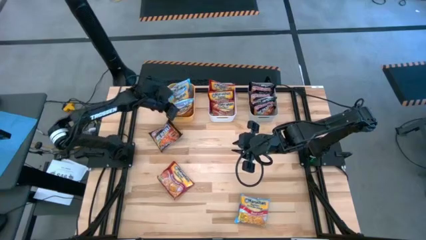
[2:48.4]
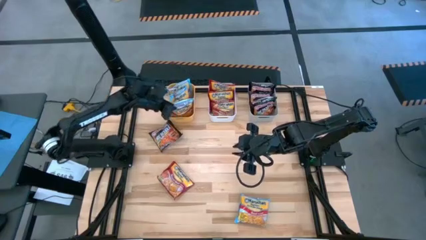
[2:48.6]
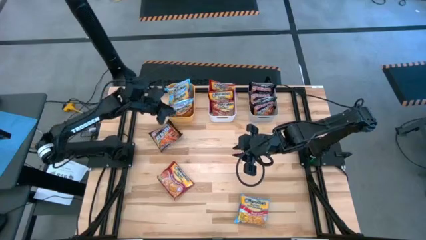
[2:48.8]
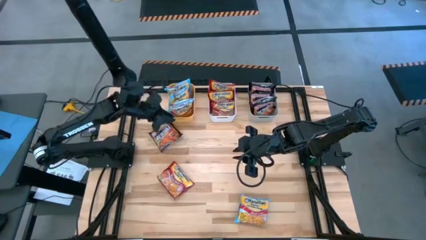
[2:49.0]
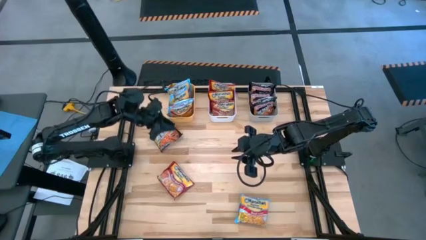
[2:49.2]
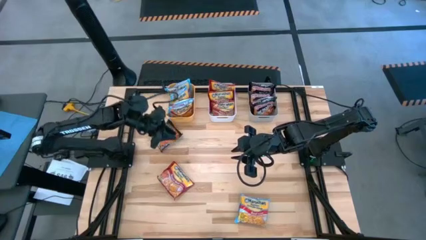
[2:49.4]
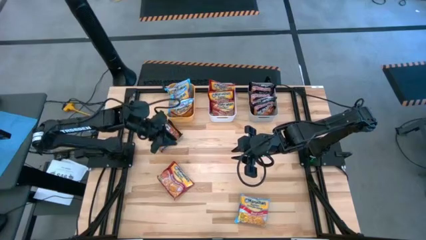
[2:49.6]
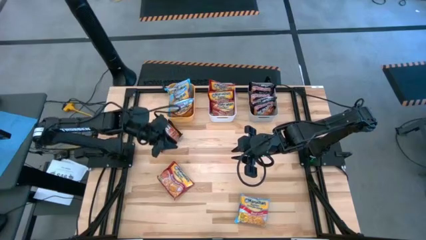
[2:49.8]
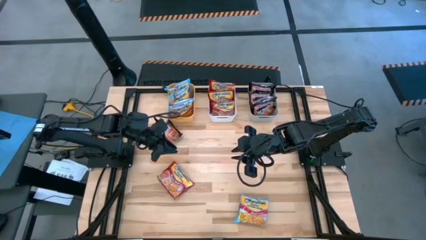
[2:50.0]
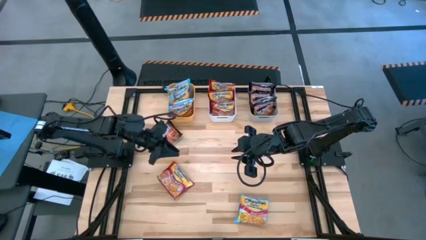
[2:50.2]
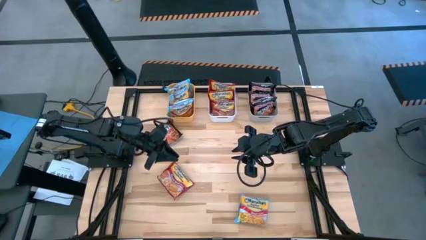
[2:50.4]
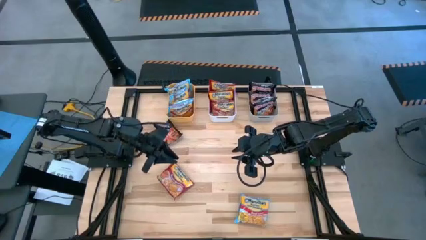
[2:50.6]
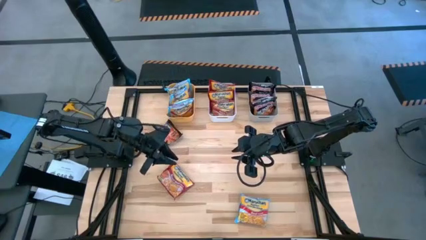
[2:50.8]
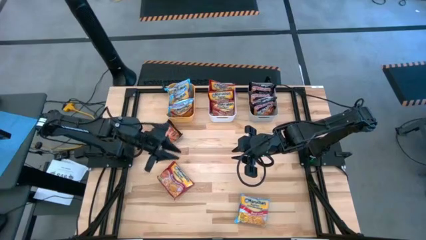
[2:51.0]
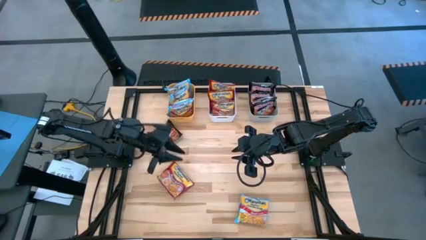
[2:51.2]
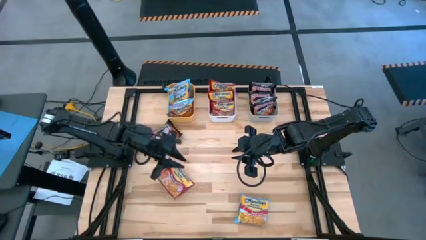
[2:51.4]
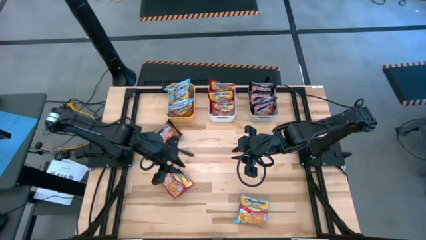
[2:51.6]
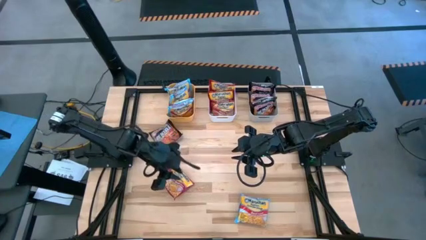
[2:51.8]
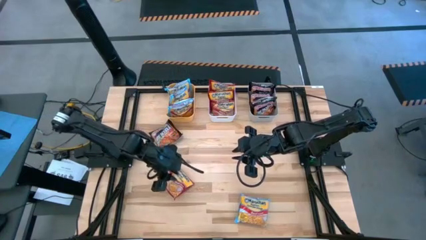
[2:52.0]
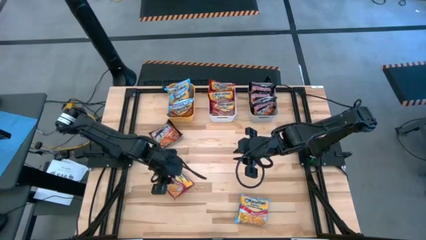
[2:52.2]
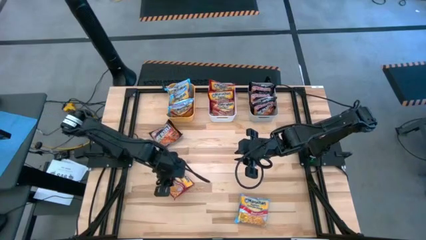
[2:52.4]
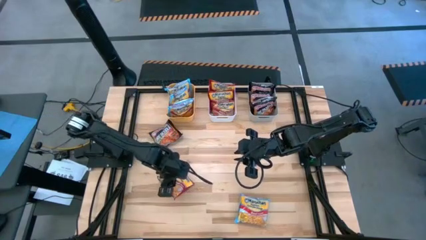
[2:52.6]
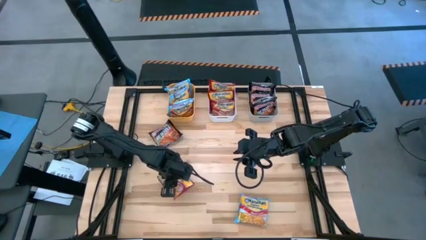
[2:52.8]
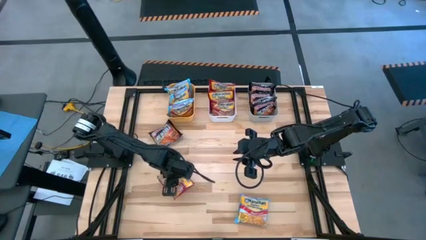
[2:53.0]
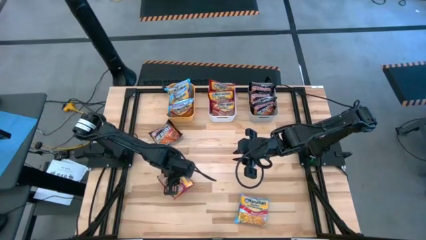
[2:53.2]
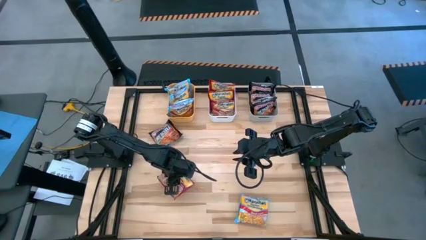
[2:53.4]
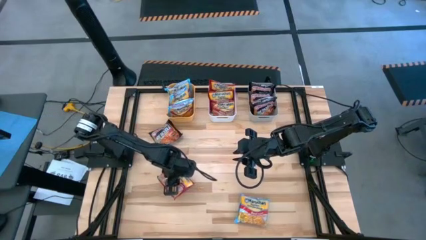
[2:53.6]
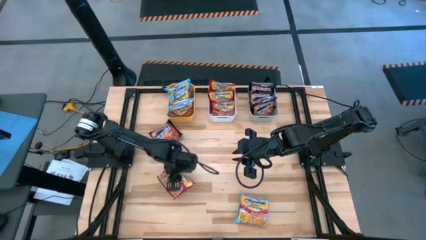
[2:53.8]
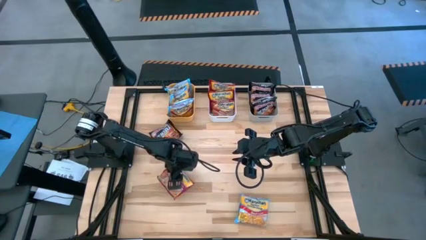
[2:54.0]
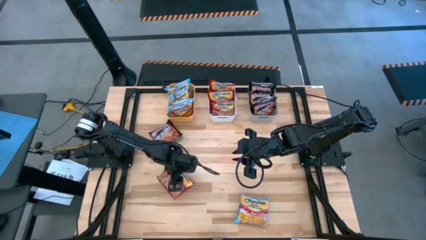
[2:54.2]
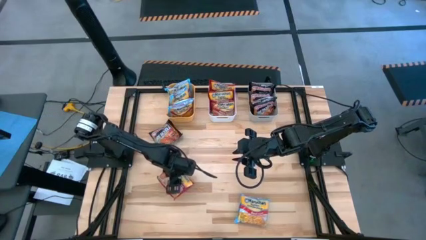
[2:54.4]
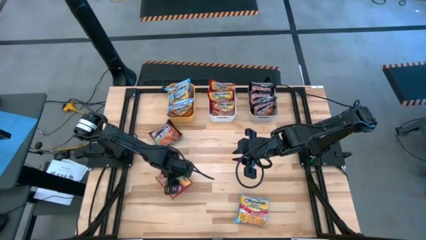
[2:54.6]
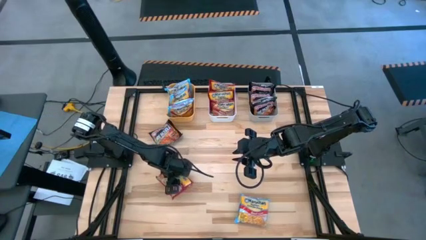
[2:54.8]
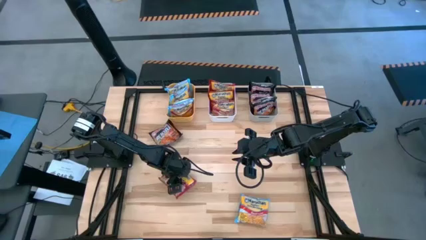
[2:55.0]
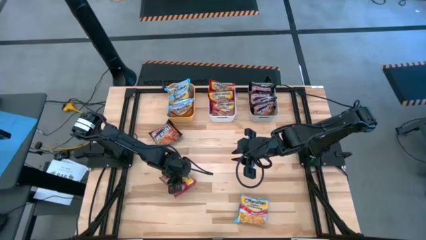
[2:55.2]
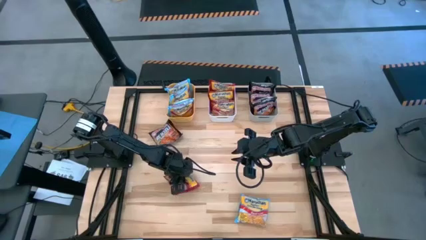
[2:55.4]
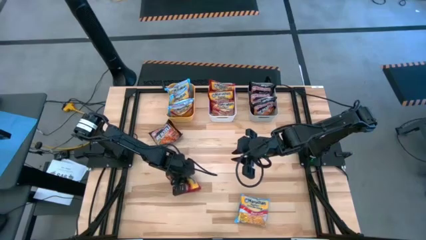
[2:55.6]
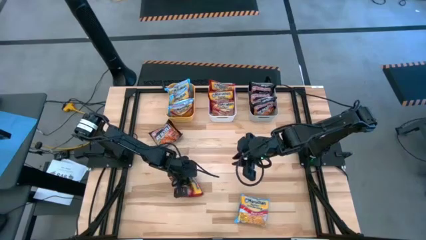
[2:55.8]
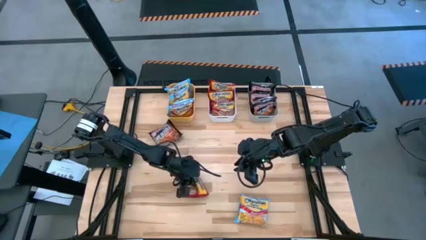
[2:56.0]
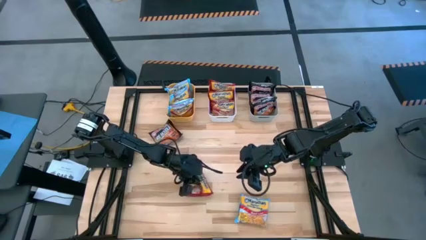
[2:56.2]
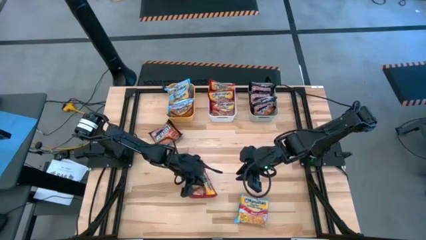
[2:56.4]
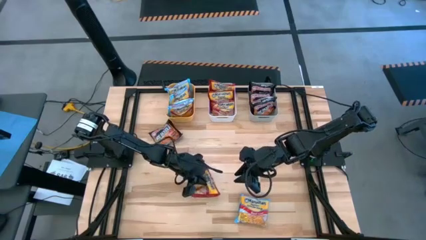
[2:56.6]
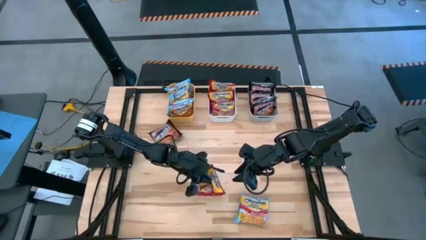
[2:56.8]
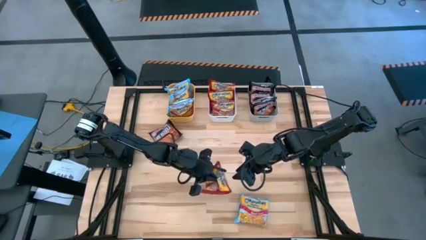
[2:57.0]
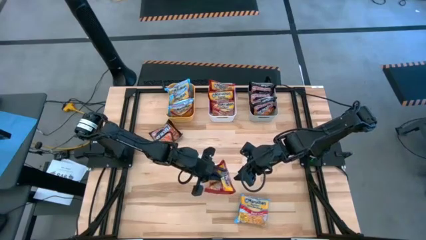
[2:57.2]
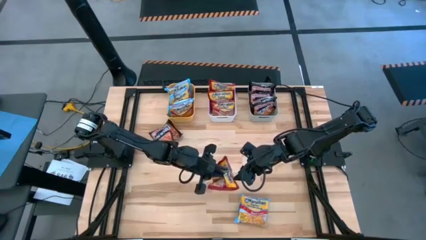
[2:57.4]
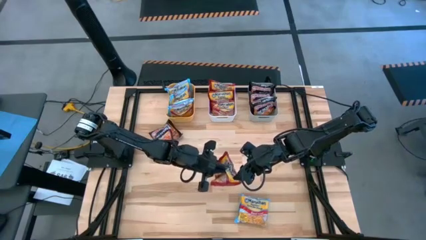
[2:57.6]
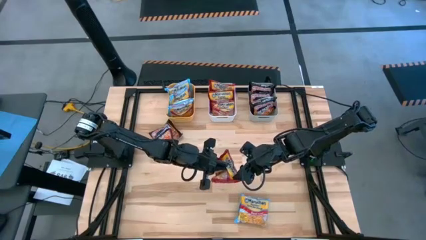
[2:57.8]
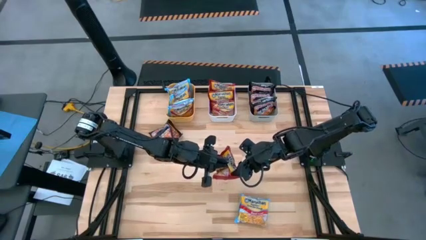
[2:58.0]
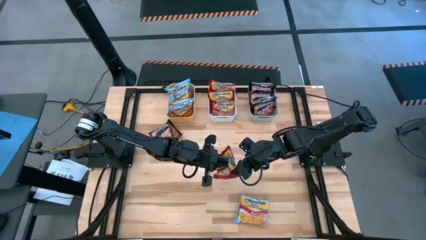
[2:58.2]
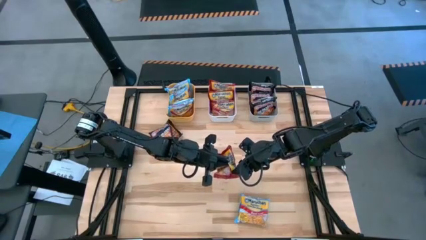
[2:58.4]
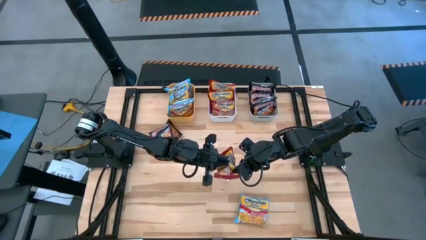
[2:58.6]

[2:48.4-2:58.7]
Task: Sort Maruchan noodles
Put the red noodle pack into the white bin

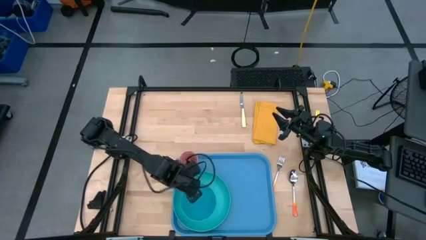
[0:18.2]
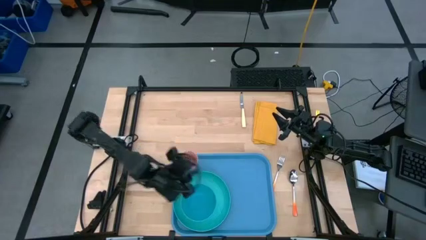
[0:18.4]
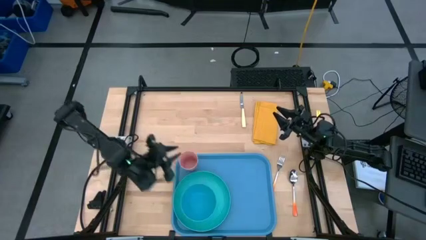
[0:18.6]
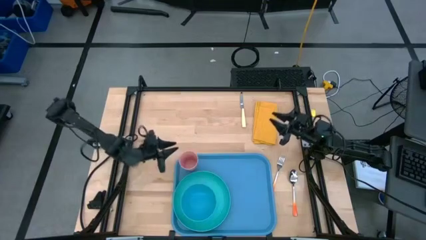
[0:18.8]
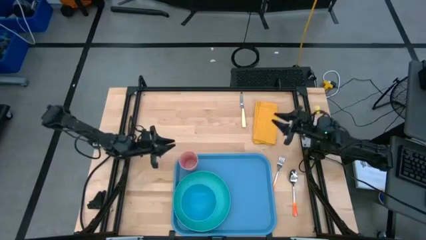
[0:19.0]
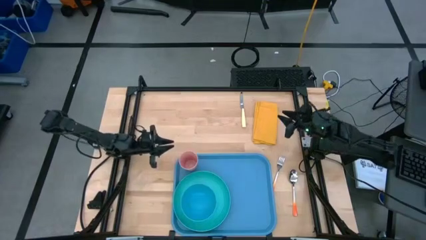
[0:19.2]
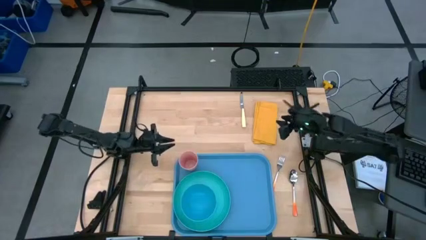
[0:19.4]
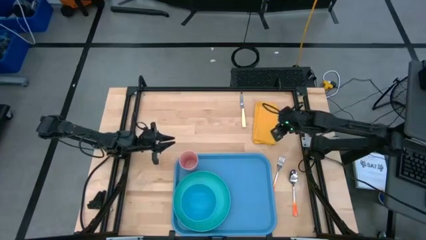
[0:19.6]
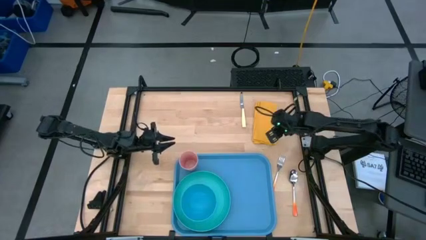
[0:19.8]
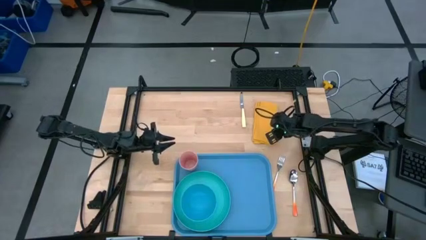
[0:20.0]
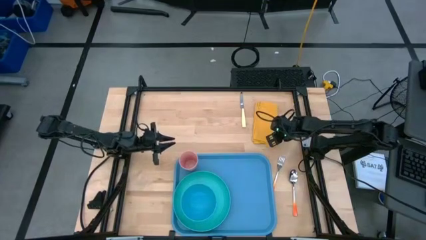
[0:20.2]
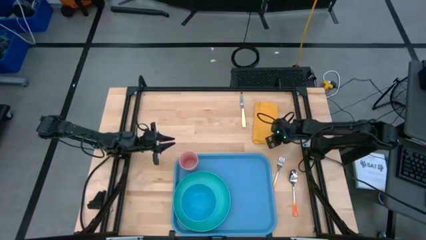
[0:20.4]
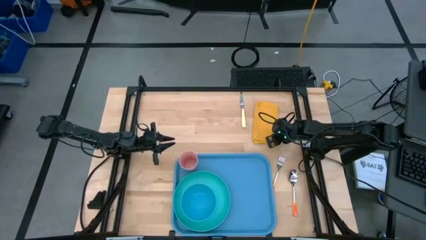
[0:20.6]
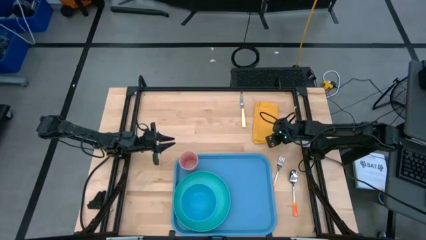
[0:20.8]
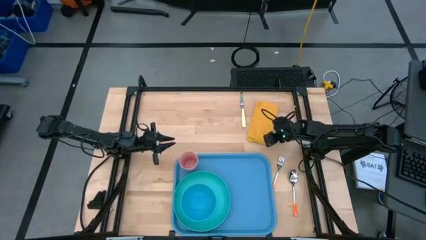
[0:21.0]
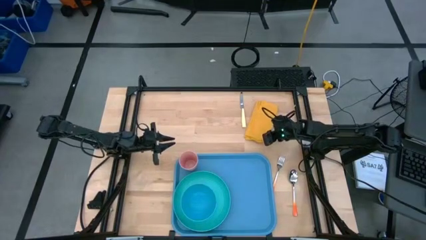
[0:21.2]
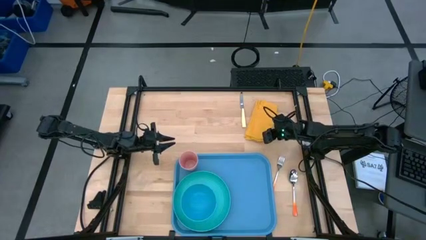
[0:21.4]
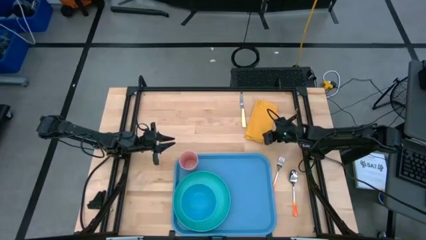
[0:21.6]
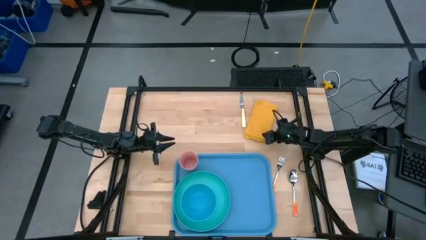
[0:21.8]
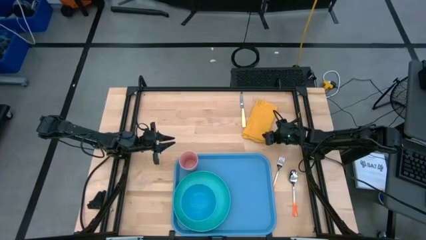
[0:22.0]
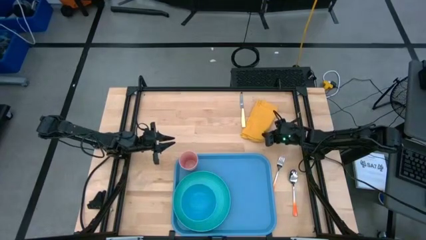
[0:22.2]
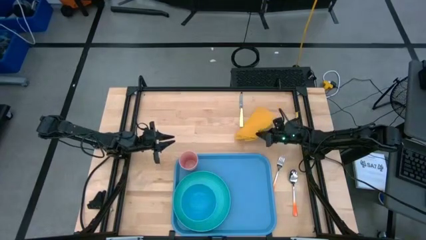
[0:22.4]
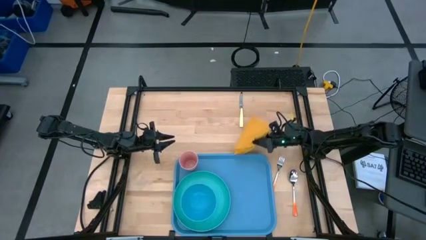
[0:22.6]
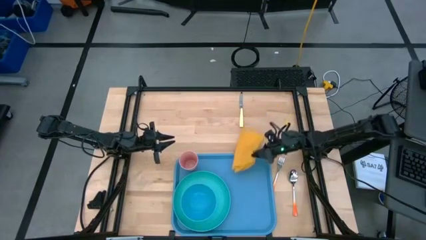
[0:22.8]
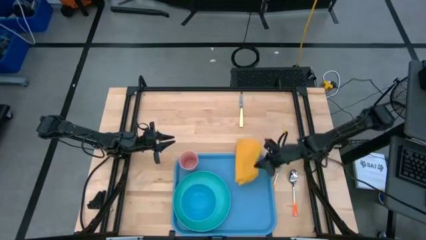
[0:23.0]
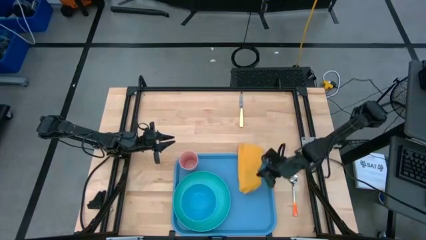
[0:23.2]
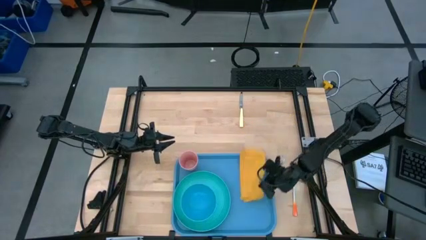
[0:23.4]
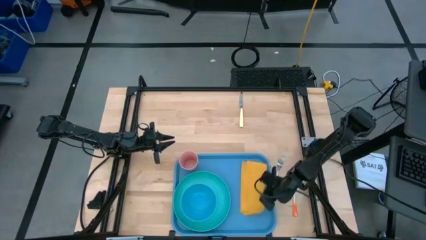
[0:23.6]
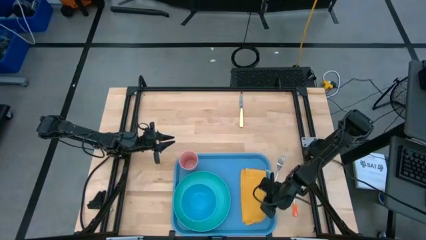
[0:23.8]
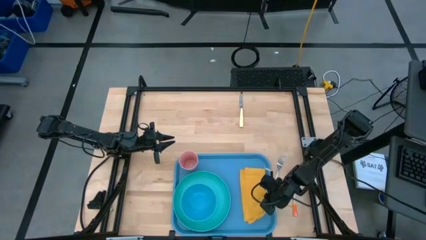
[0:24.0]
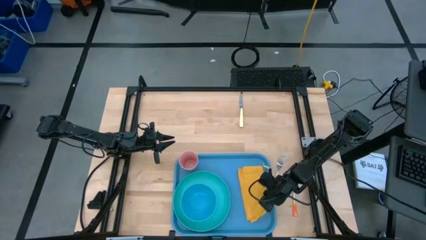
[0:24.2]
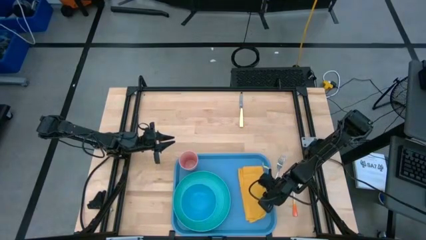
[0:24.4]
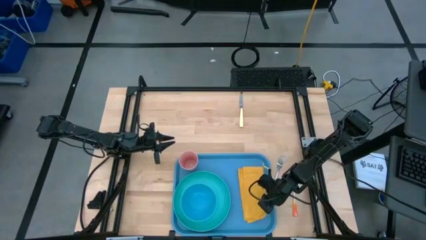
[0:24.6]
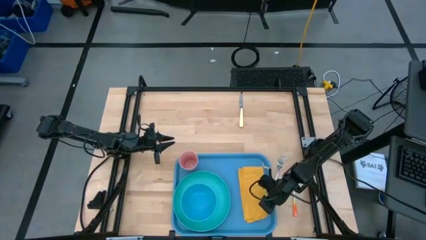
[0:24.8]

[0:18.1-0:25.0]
Task: Set up tray
Put the yellow napkin on the blue tray to the right of the light blue plate
